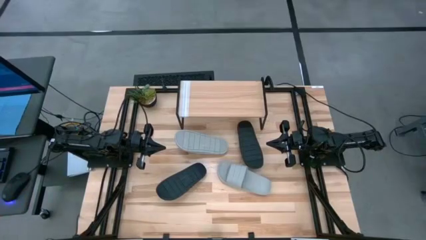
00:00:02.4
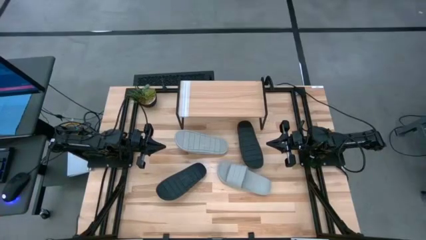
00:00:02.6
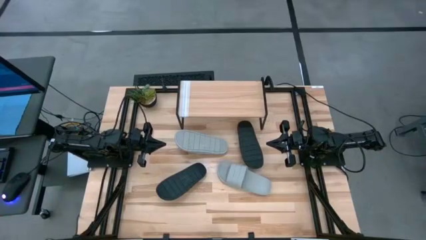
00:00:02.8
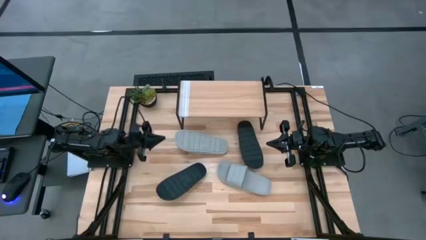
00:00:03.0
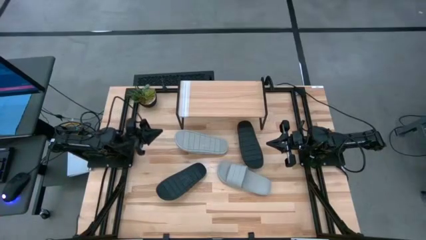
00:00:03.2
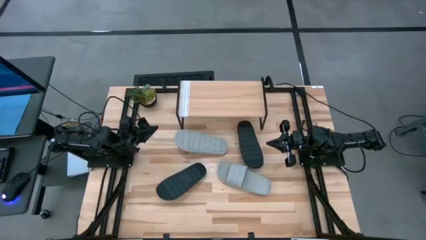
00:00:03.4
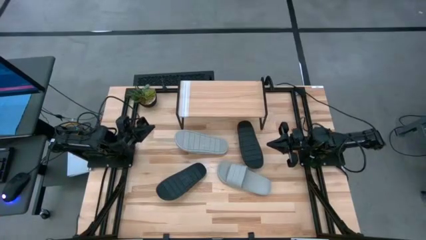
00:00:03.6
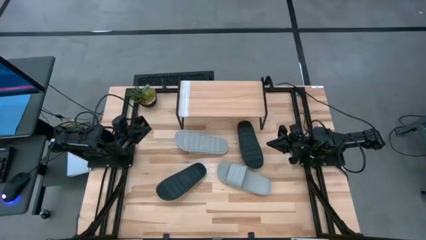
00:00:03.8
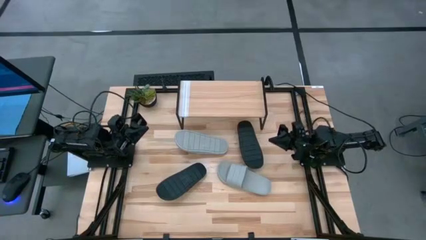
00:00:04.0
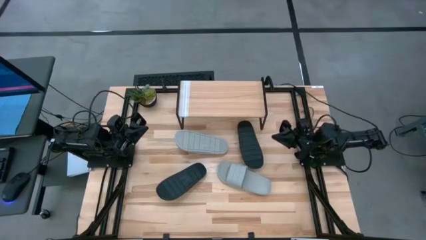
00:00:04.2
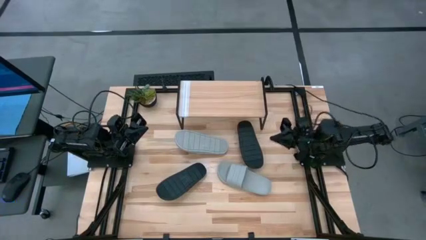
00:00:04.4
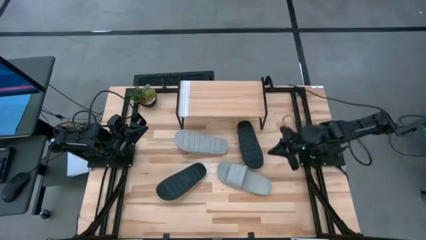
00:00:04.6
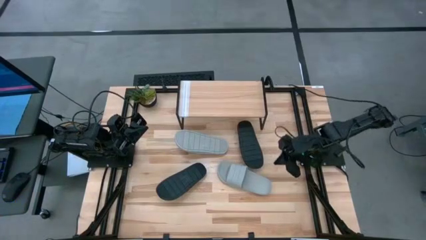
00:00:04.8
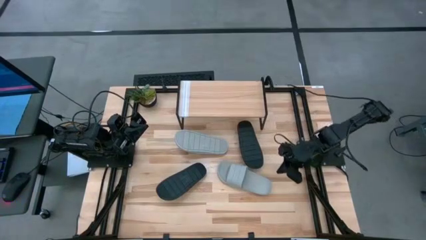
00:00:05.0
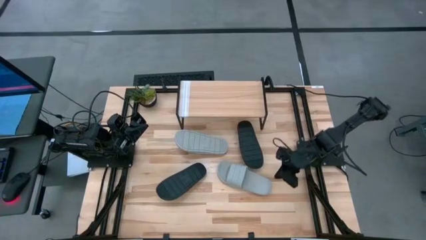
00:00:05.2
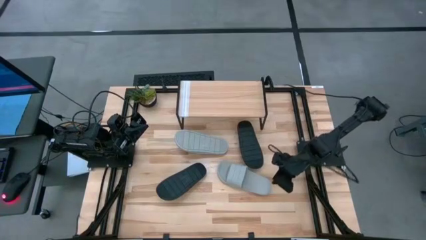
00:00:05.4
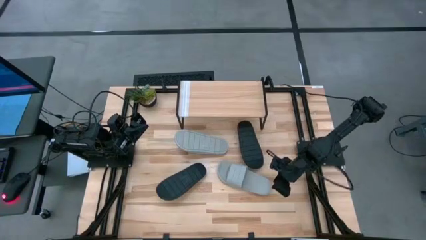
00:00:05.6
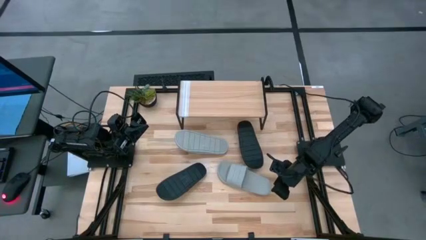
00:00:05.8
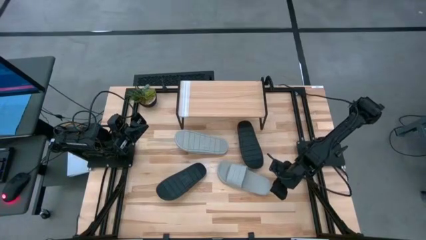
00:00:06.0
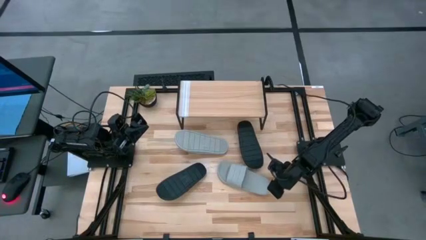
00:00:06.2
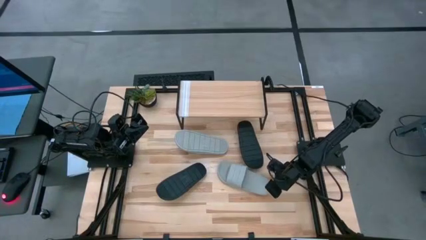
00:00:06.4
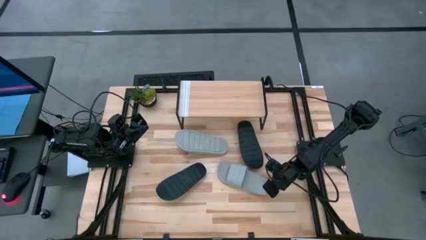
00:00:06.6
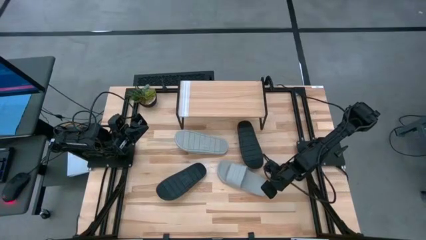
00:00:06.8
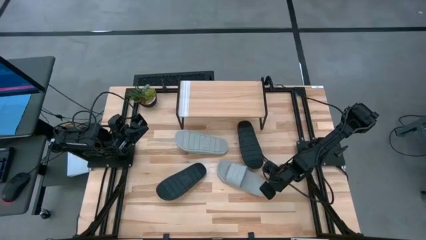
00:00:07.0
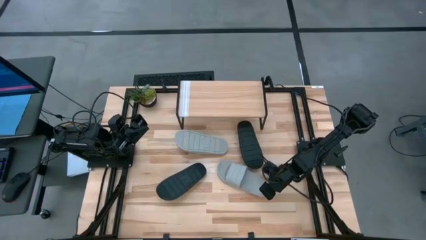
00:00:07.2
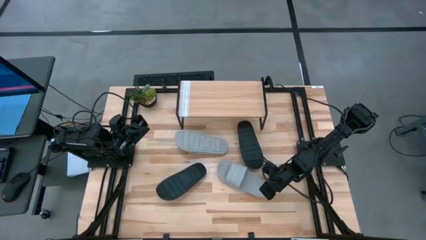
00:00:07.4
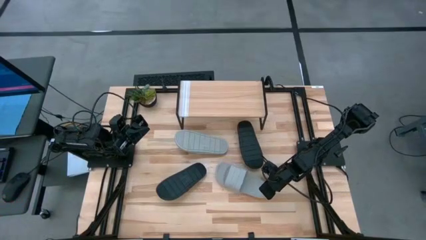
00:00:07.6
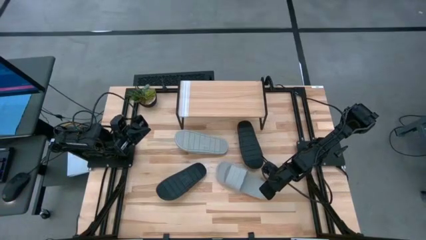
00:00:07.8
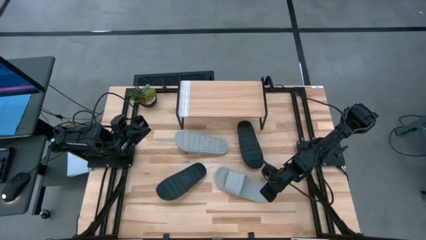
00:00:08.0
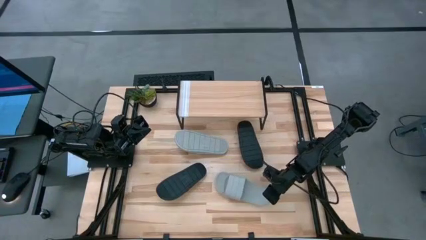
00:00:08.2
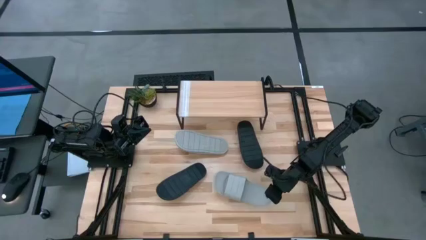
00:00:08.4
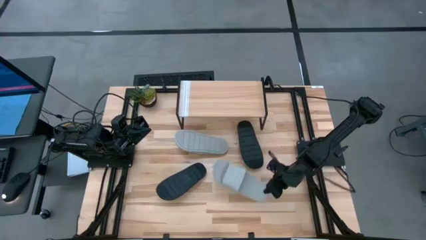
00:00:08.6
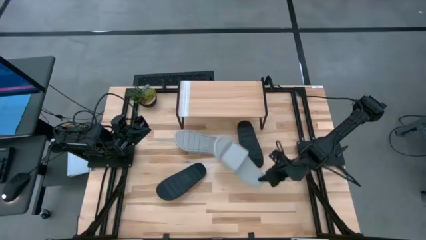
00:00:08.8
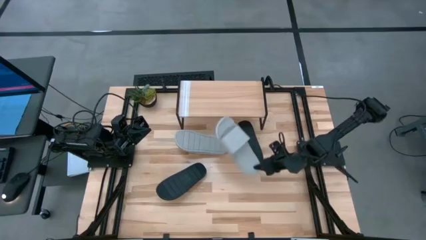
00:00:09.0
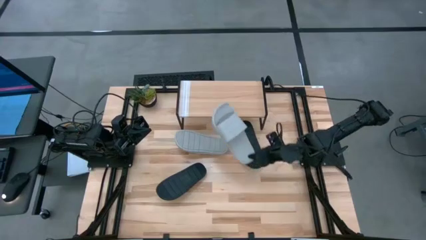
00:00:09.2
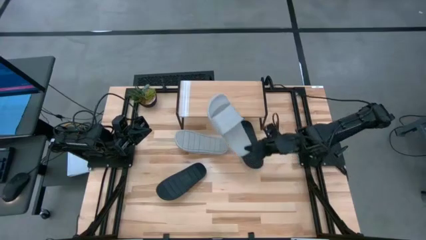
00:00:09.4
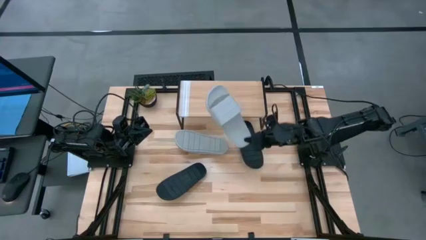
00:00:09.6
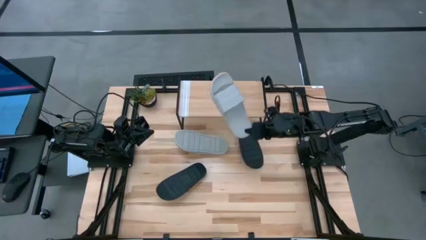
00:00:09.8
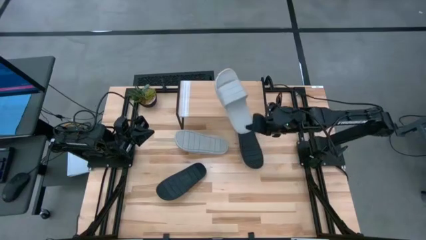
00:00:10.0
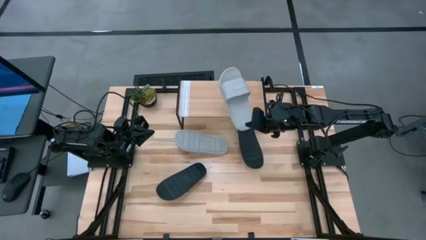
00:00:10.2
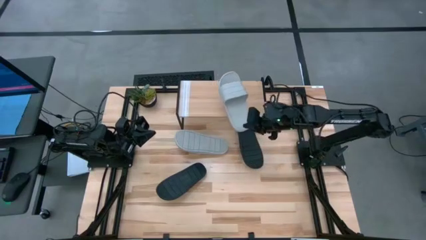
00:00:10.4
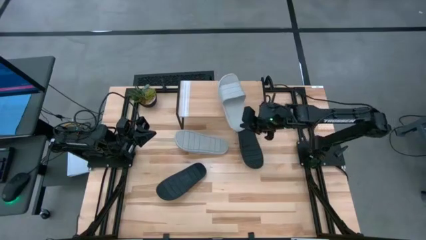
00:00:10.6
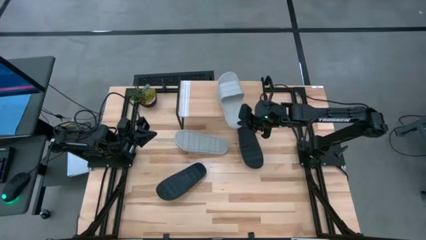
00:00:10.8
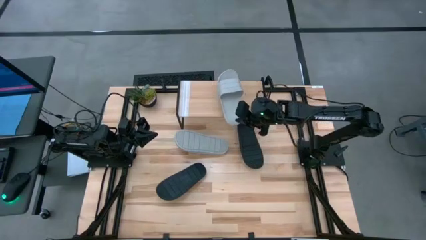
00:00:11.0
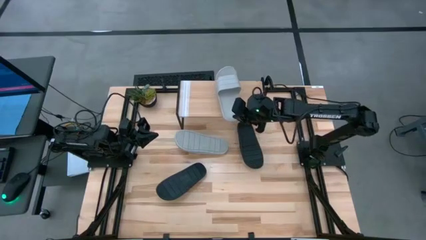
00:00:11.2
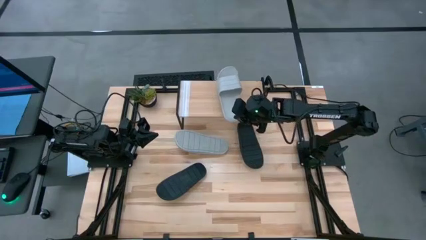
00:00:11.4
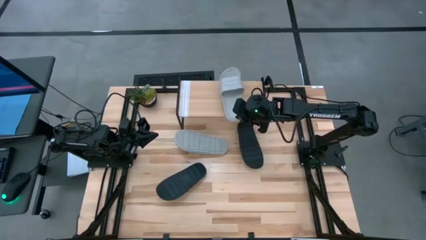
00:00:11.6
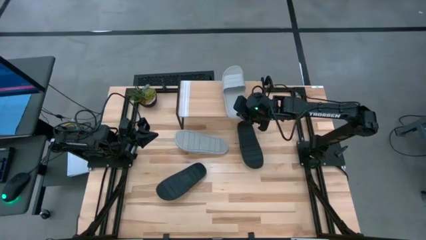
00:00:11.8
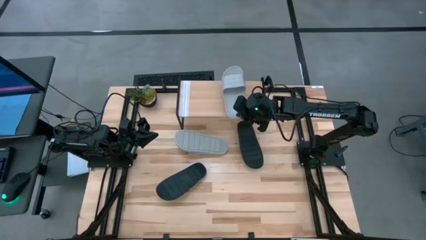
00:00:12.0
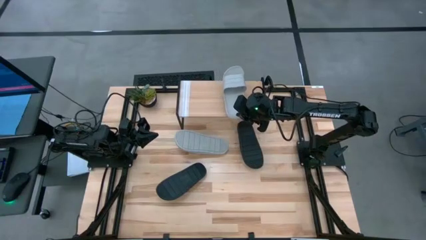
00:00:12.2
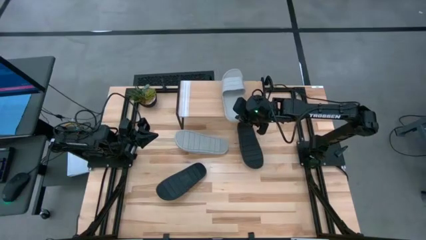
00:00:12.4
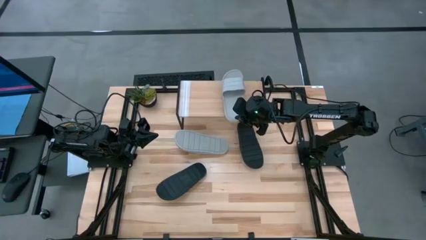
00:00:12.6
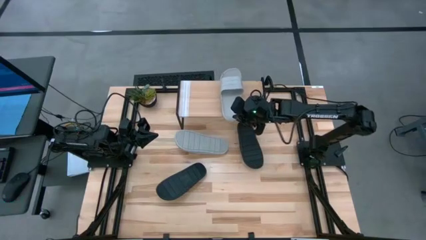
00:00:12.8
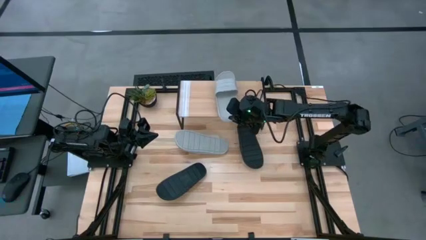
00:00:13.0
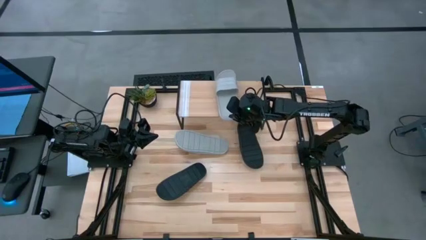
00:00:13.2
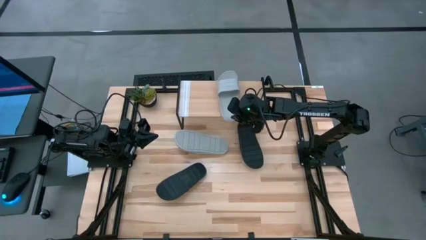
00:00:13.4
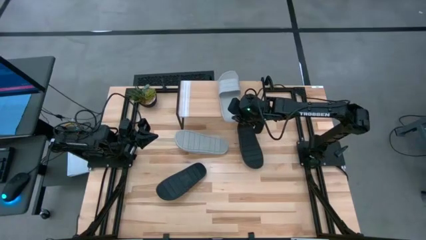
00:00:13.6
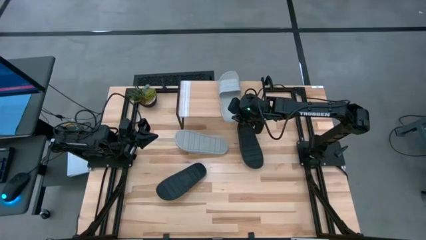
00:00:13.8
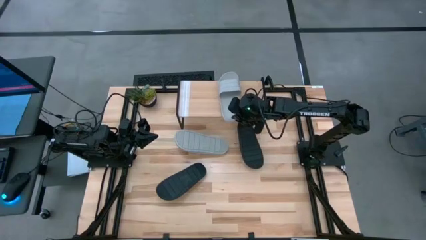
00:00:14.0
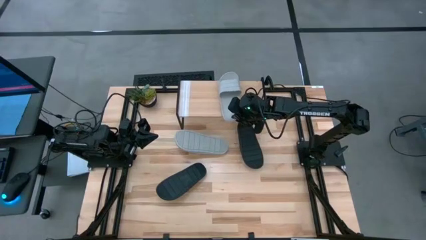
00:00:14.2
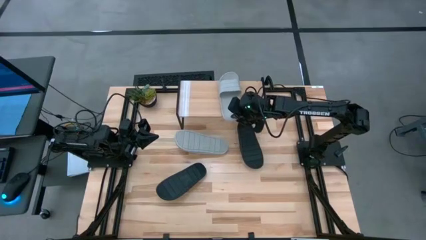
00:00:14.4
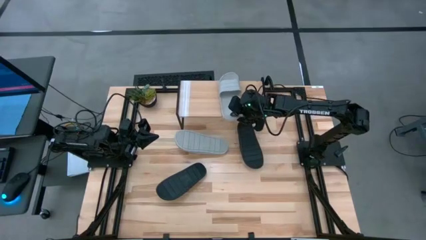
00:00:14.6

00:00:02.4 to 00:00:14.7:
Task: Pick and place slides into the shelf
Put the bottom gray slide on the shelf
